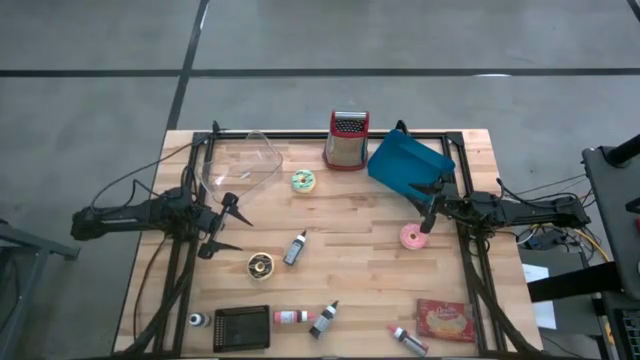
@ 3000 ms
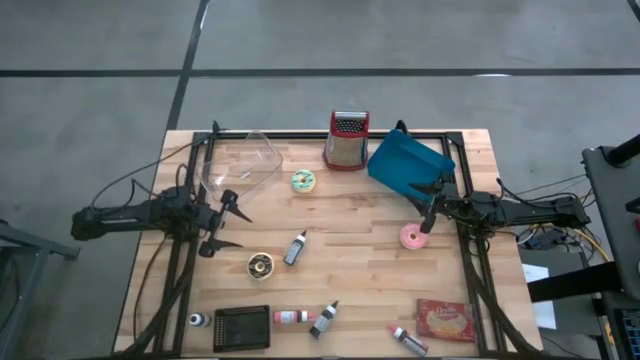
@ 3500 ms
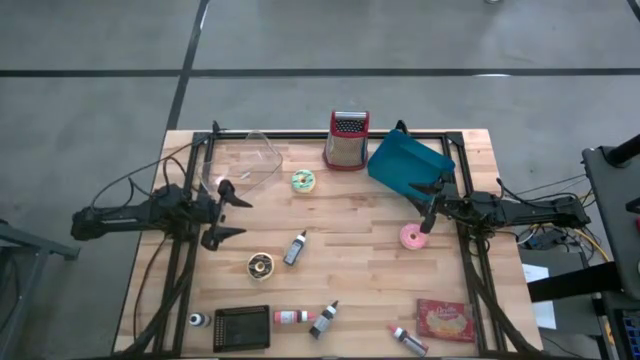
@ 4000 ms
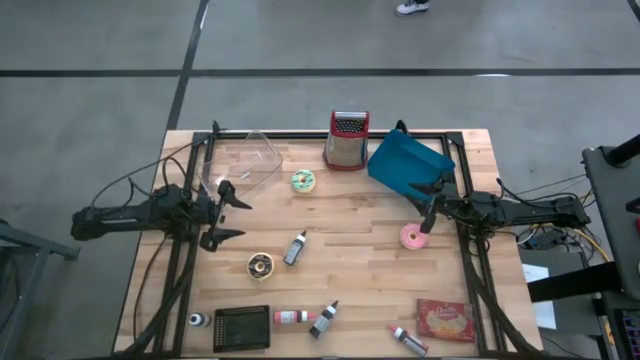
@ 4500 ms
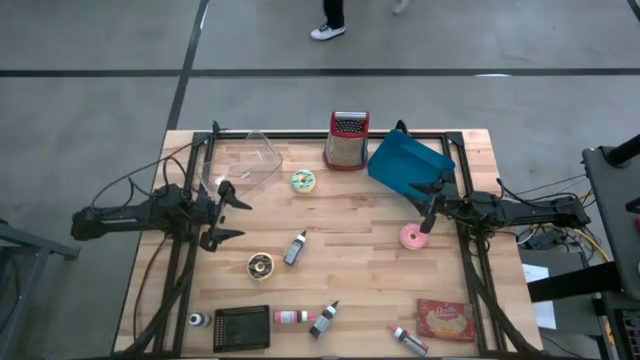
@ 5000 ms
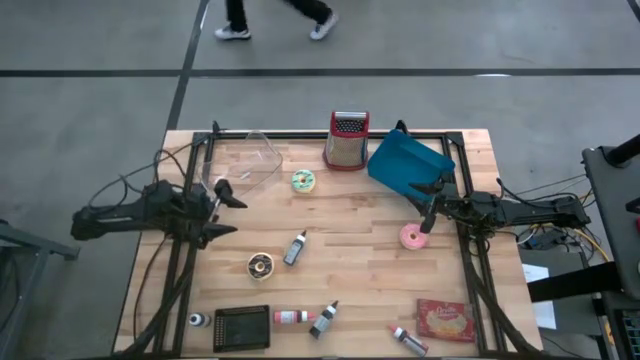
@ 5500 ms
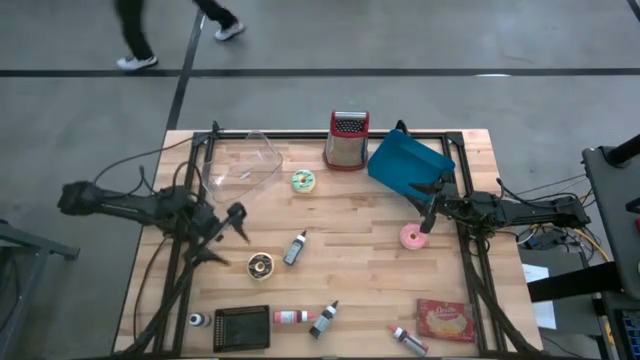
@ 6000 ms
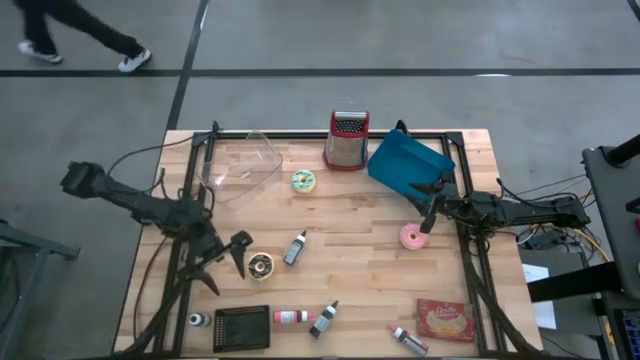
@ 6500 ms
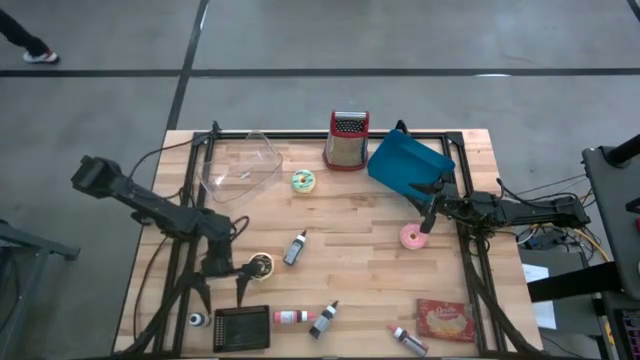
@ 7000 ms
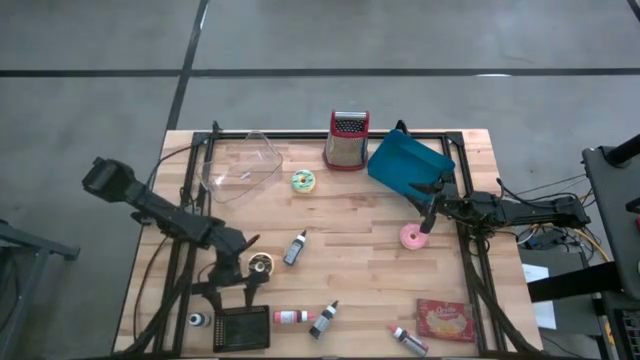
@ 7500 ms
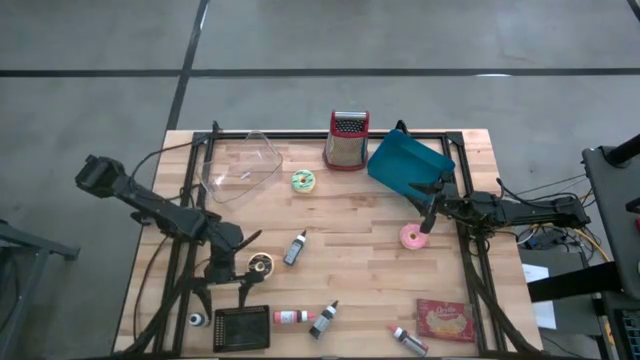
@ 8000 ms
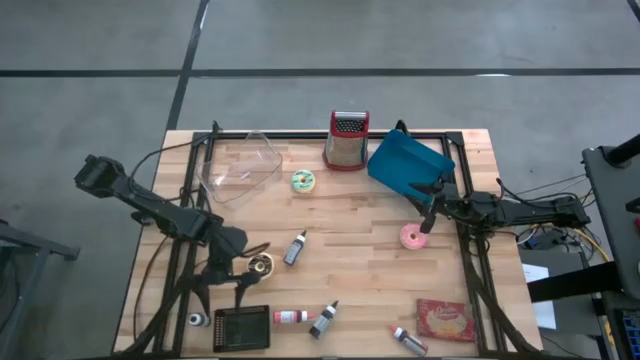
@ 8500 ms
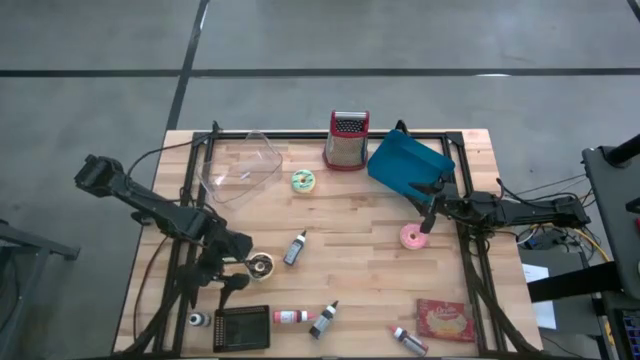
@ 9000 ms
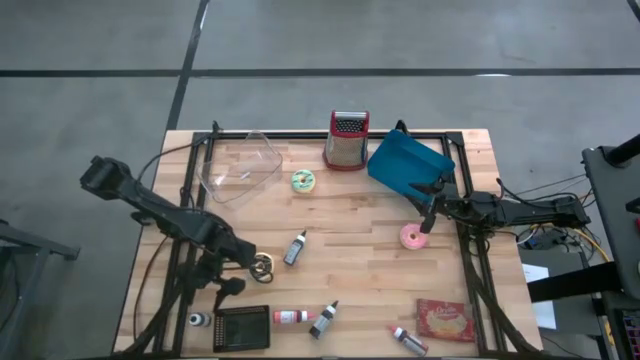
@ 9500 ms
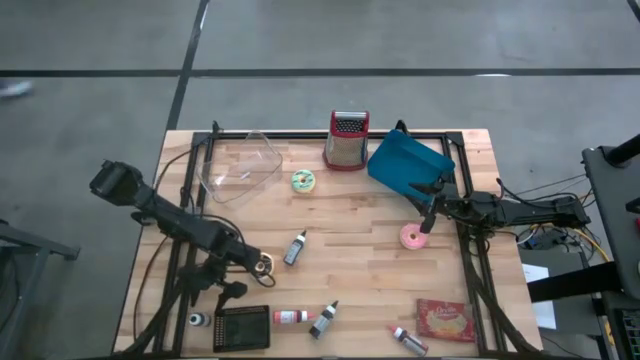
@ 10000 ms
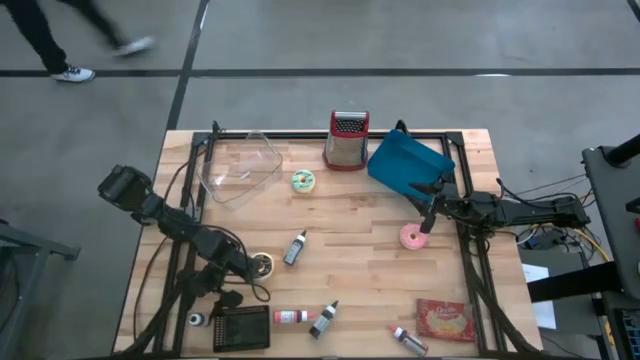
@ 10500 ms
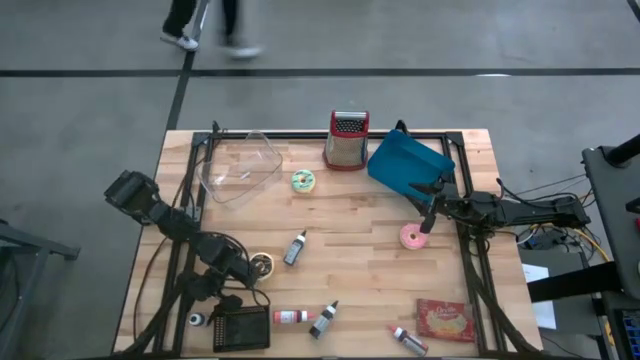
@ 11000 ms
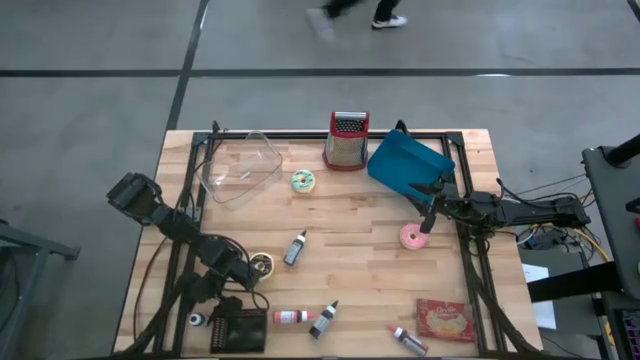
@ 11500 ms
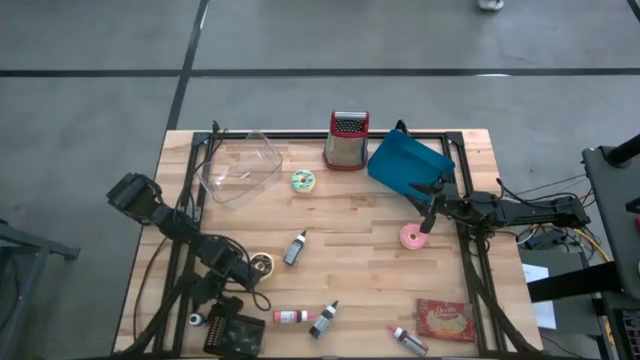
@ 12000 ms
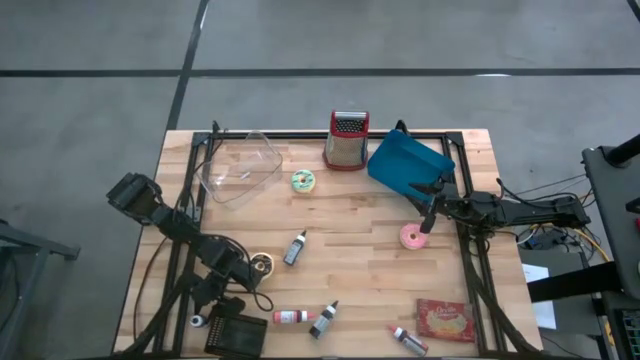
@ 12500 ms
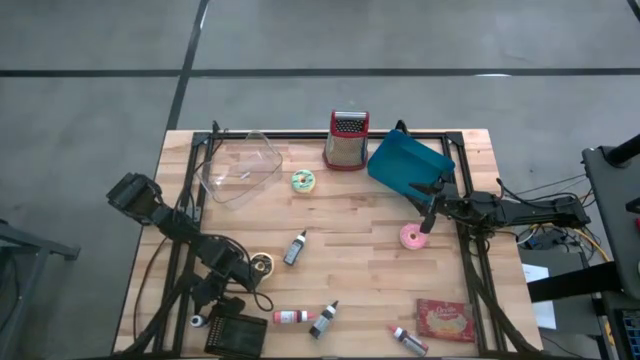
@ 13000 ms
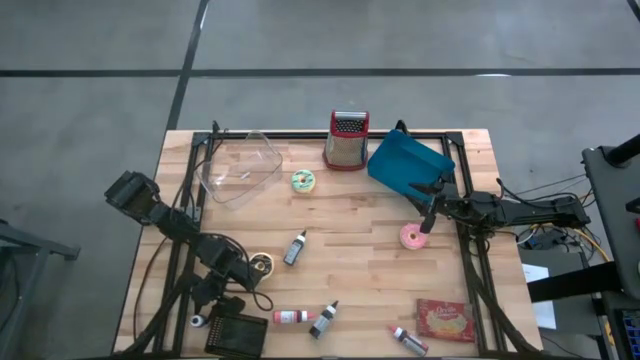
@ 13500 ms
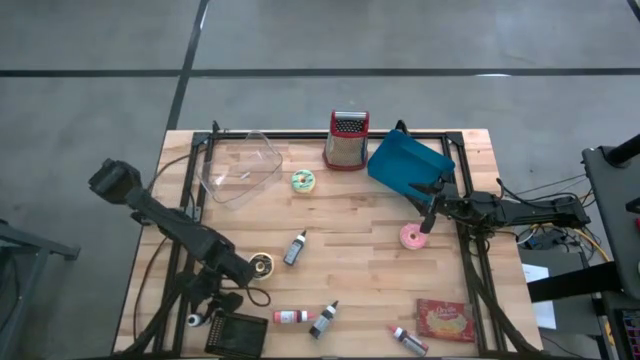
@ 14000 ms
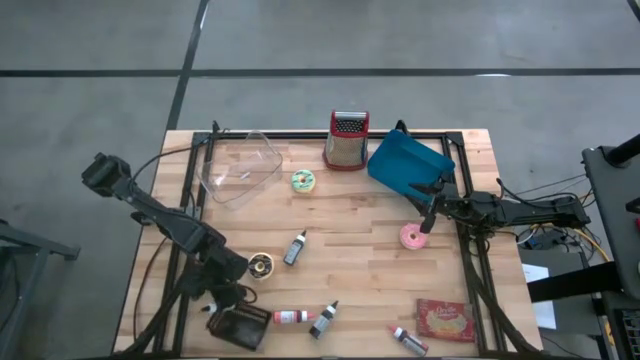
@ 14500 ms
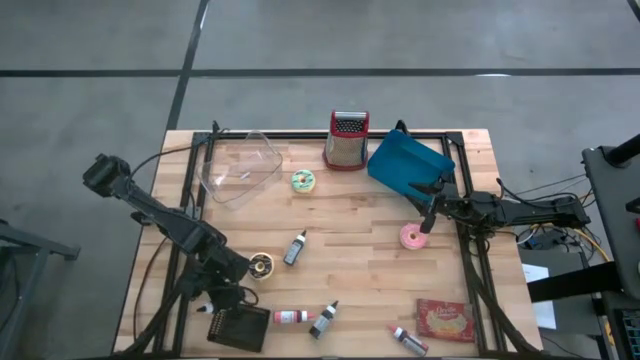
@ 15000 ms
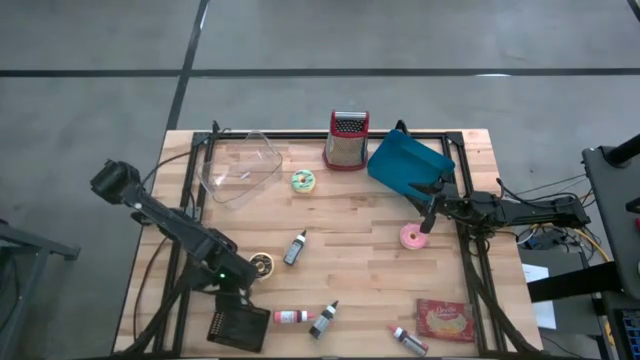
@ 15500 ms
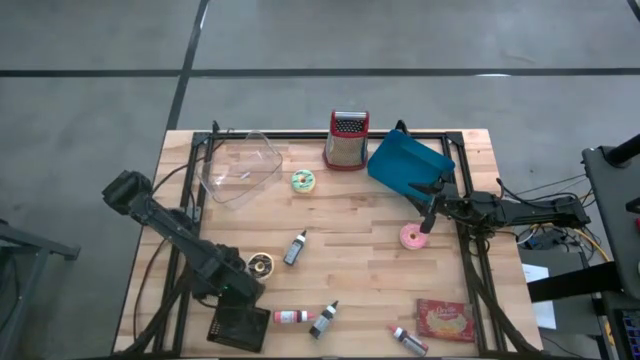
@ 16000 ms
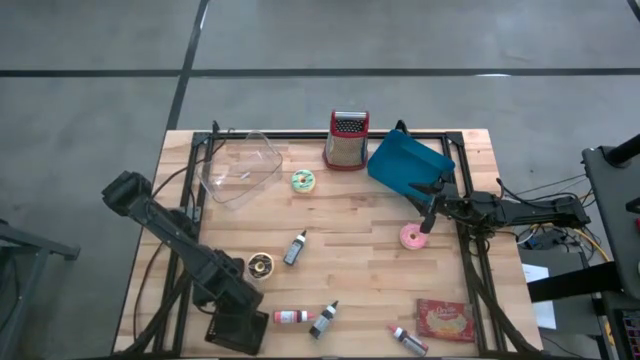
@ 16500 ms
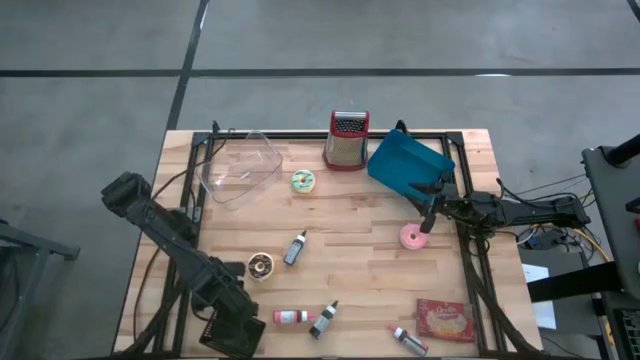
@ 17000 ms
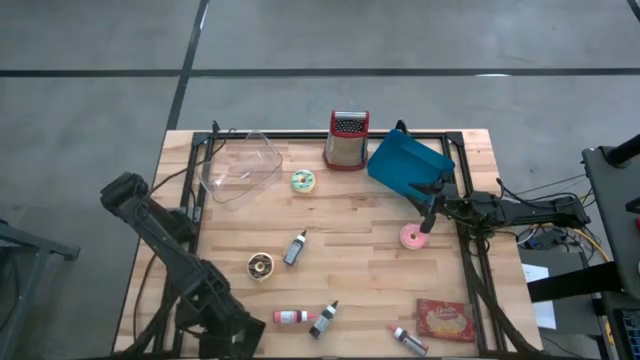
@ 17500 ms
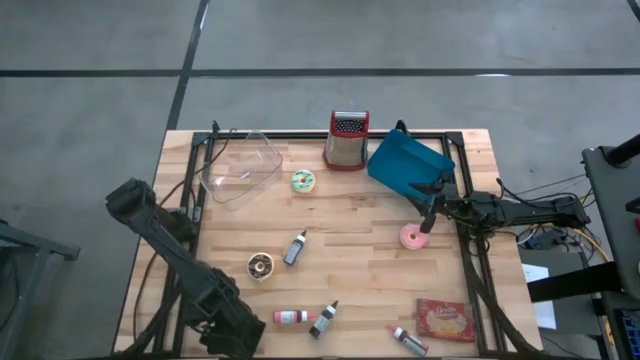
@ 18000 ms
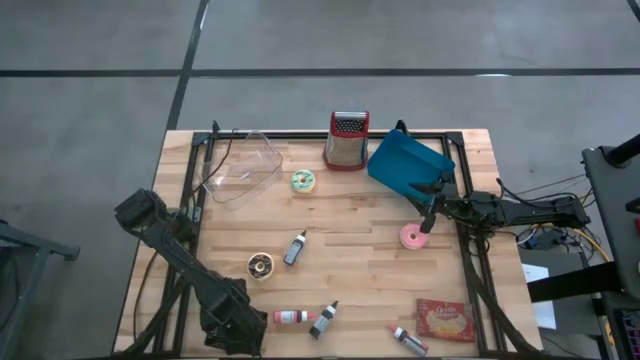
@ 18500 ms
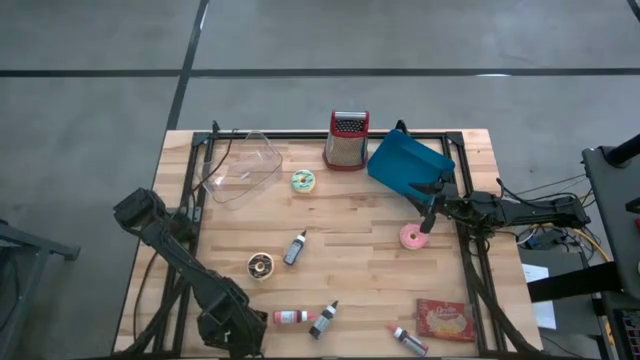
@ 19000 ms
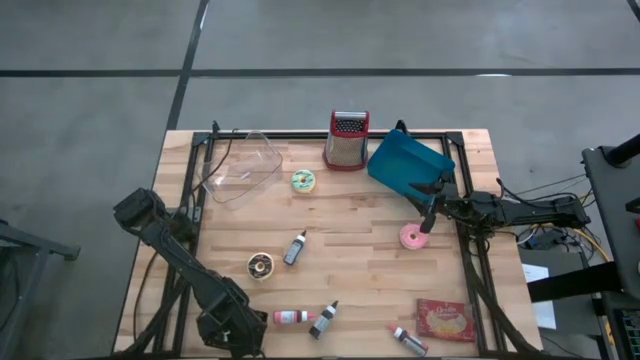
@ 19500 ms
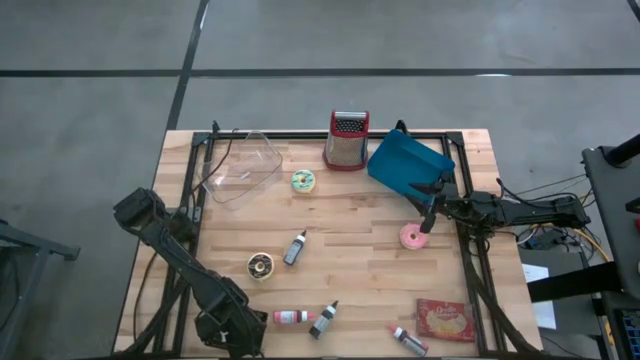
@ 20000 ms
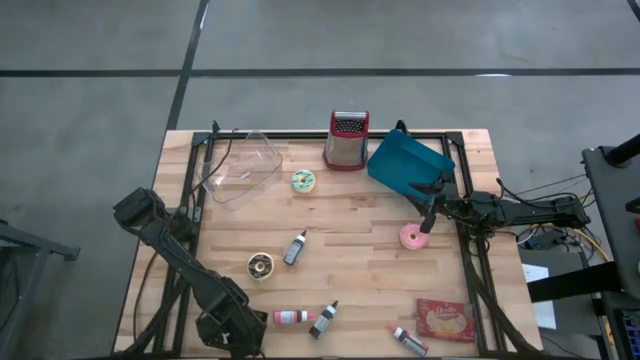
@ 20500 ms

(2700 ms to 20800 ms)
Task: Pick & Place Food Item
Put the bottom right black food coloring bottle into the black bin

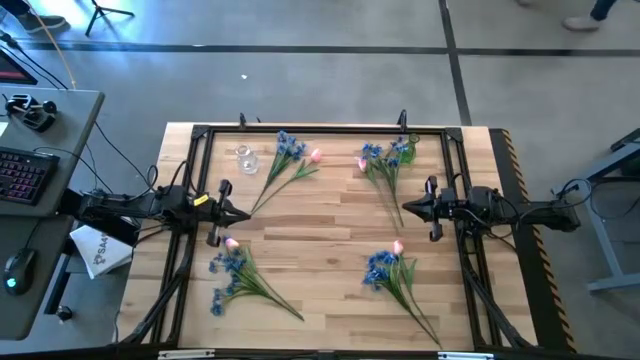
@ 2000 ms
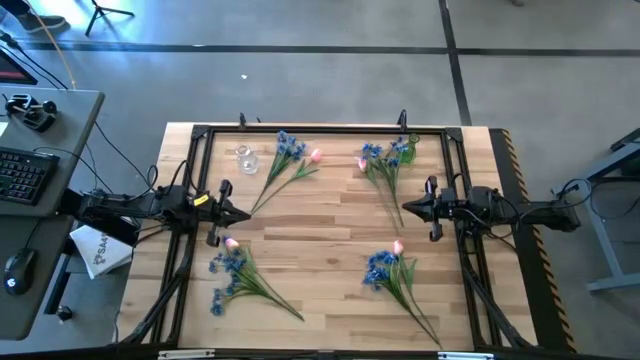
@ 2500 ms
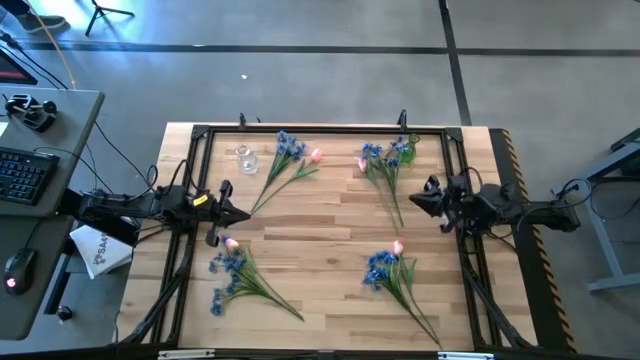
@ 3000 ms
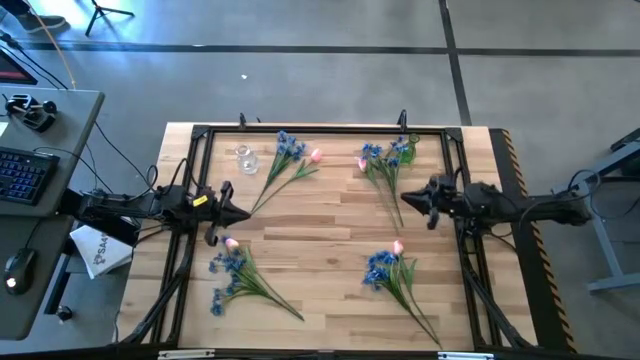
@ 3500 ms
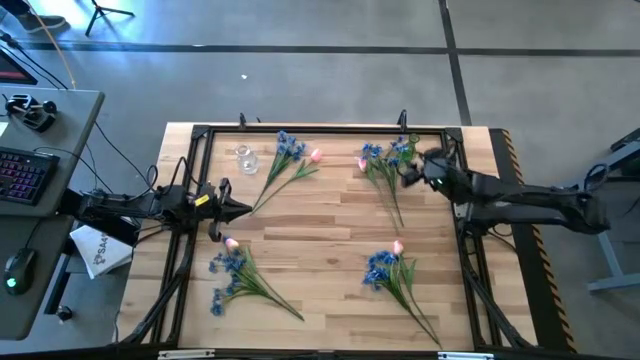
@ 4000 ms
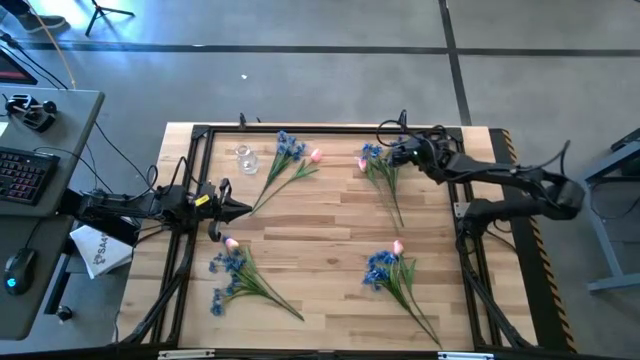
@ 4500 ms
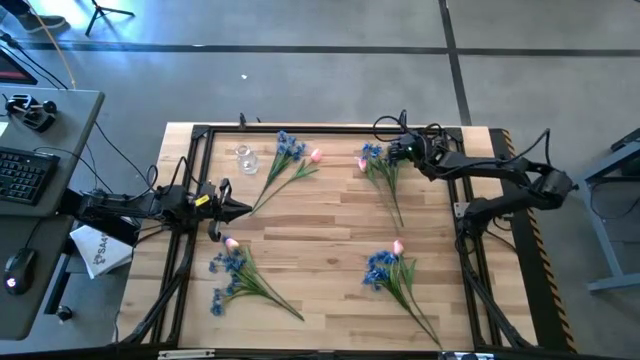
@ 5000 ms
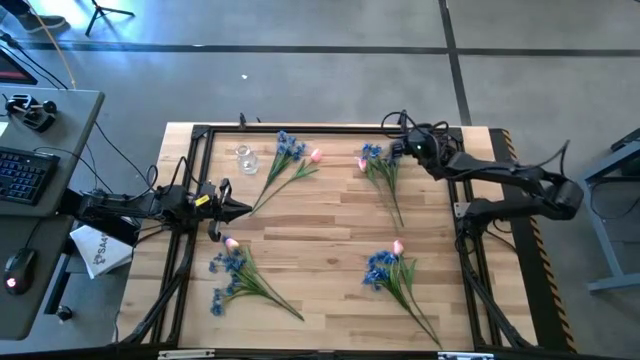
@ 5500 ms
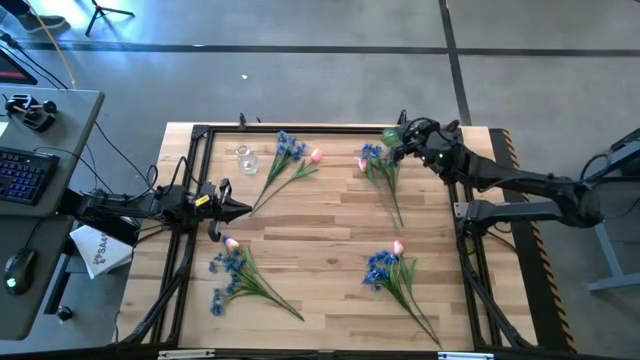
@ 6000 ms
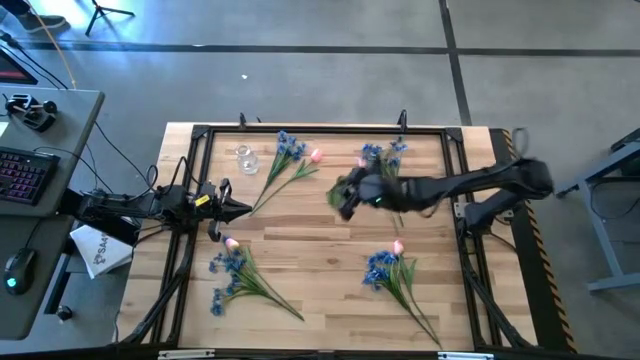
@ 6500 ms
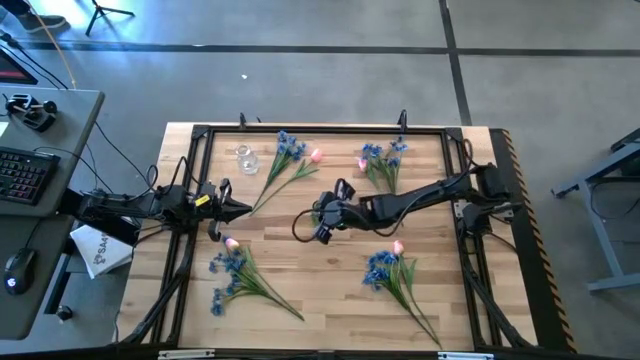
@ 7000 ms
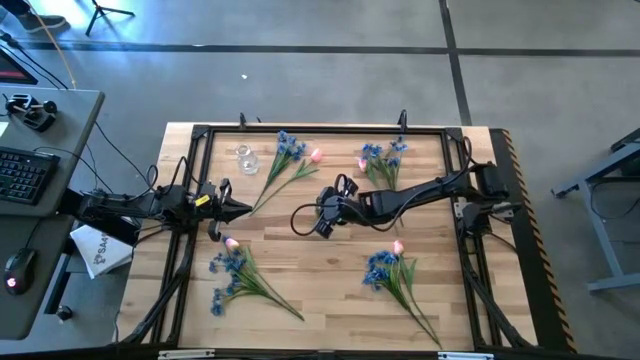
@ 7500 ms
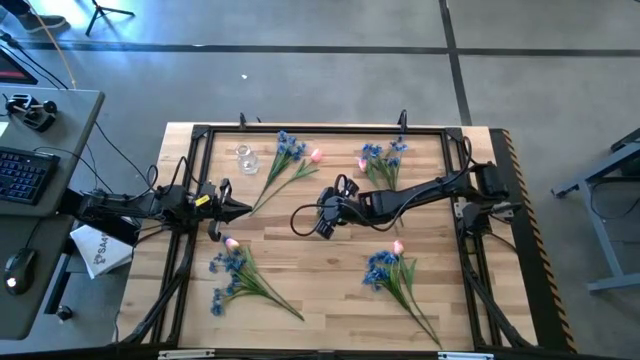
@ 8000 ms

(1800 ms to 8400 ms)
Task: Sort flowers into vase by color
Move the green vase to the middle of the table
